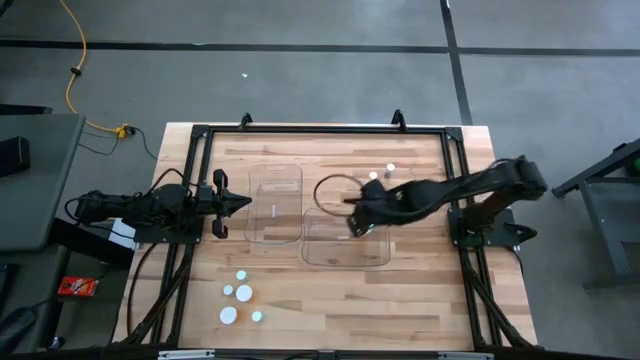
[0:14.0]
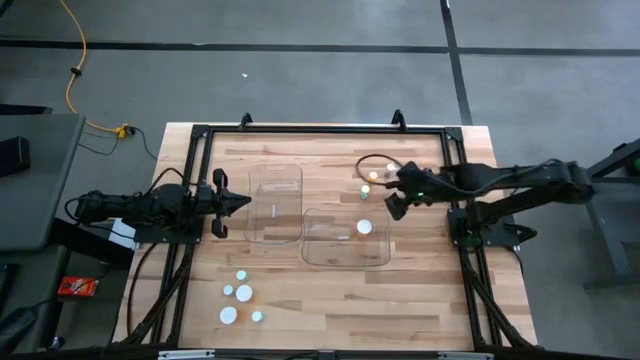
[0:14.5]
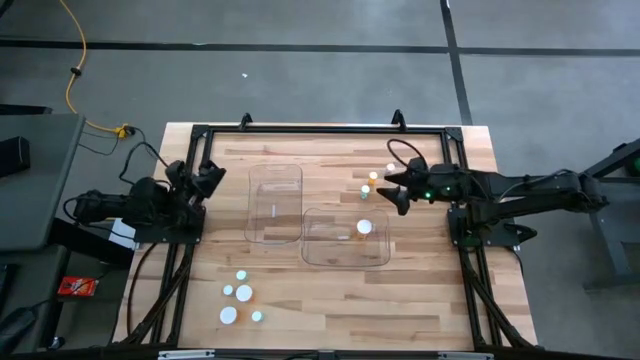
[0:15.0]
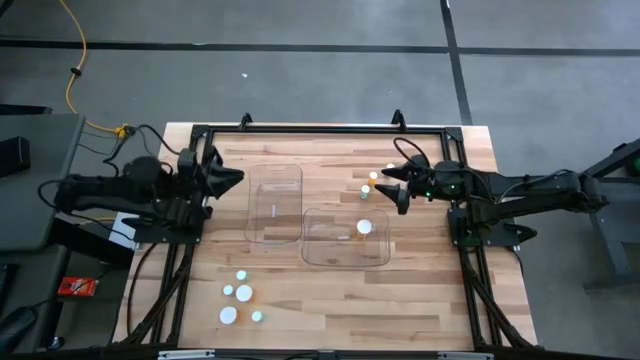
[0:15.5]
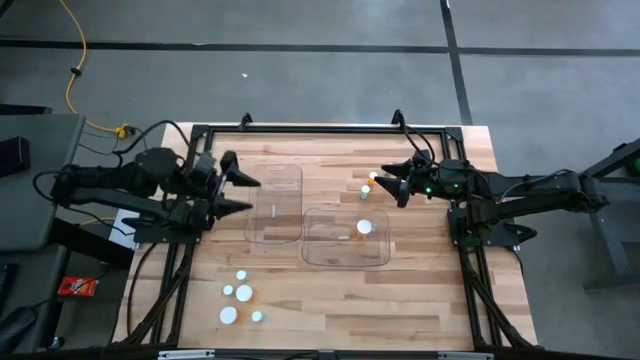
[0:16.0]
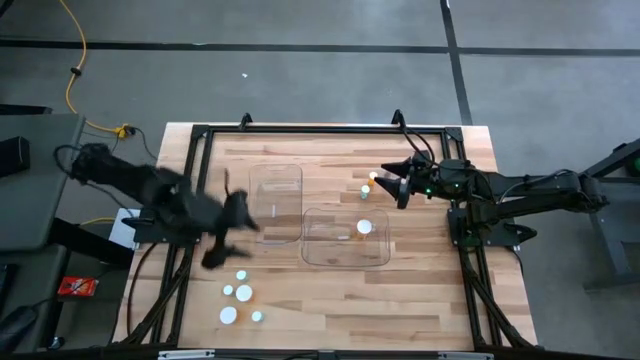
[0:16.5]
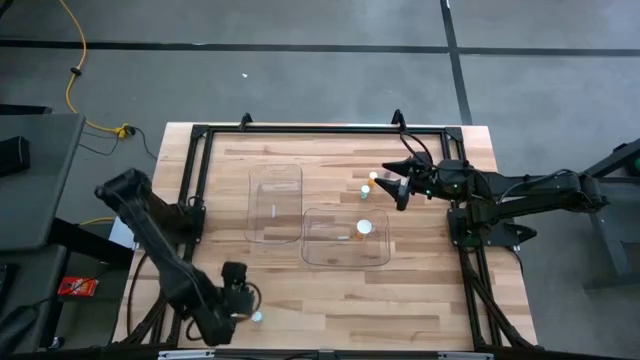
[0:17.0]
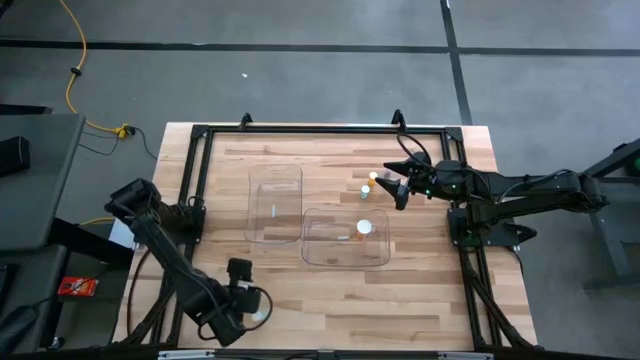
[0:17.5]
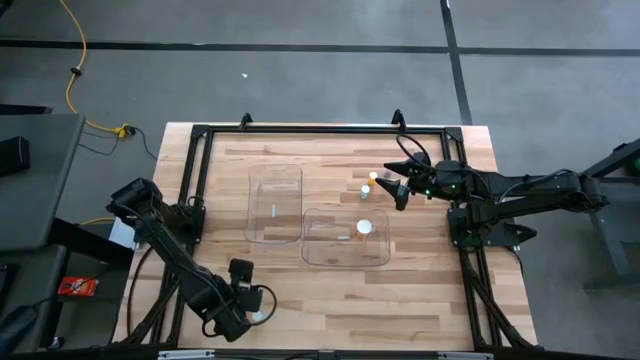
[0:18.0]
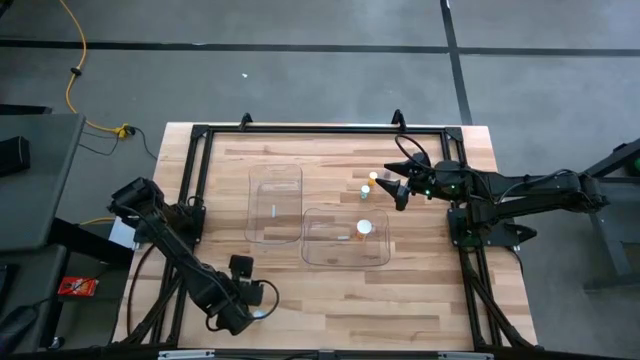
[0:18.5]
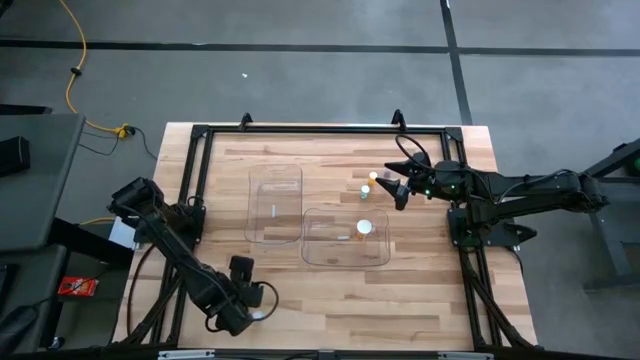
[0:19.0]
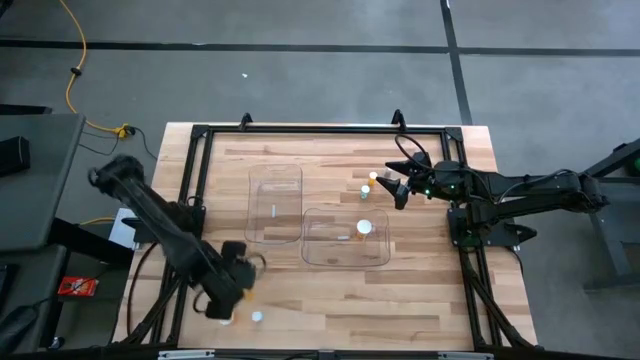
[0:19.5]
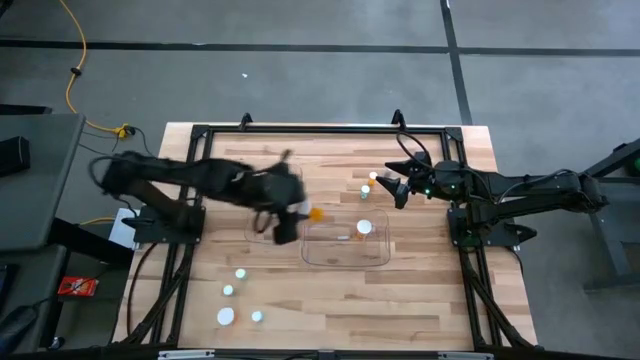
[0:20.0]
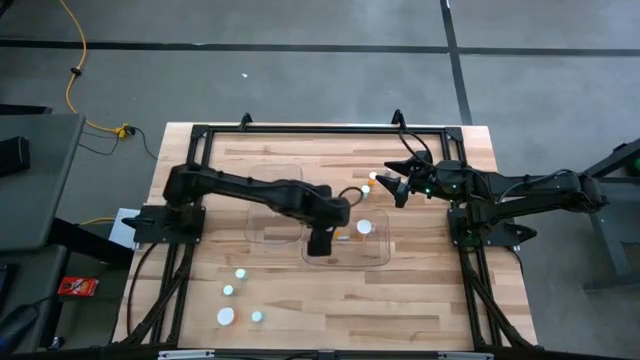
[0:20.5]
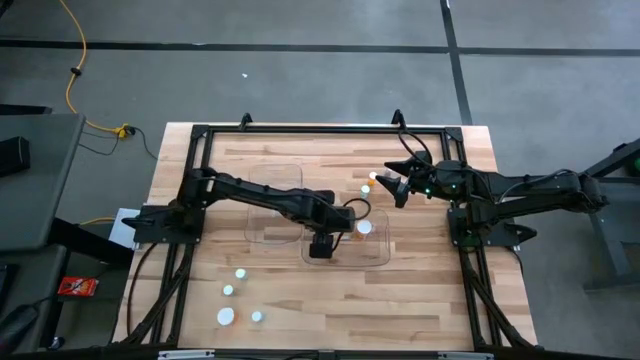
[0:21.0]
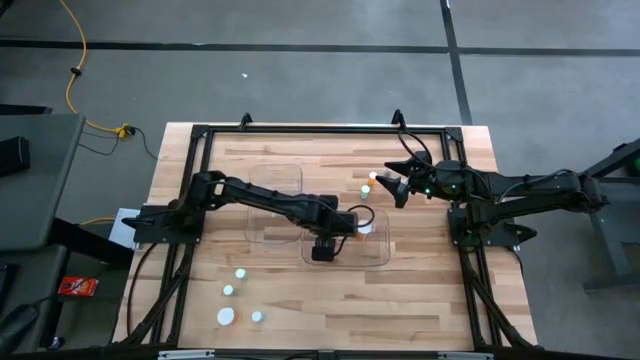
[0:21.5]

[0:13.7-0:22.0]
Task: Pick and place medicine bottles into bin by pill shape (circle, oval)
Put the top orange capsule bottle into the right transparent bin

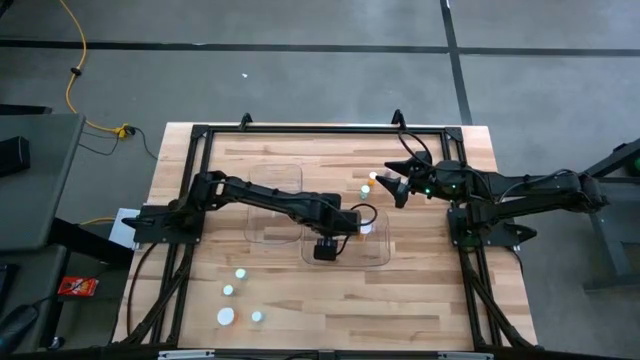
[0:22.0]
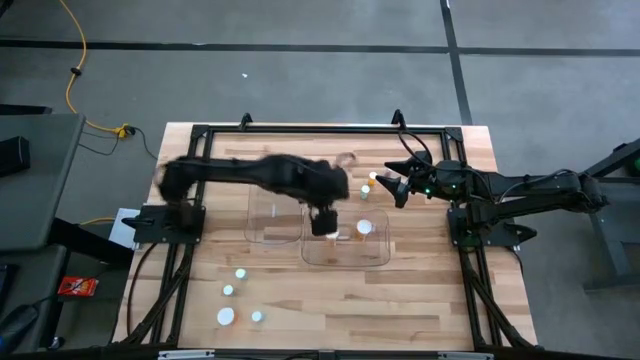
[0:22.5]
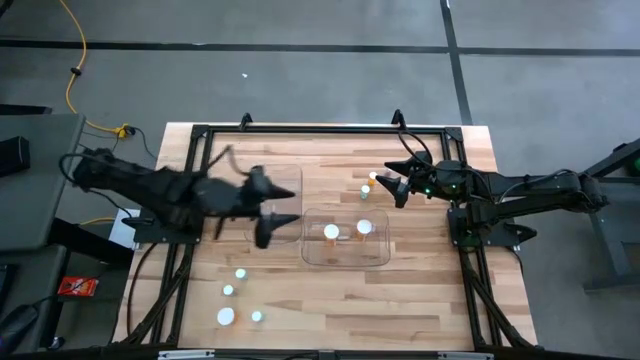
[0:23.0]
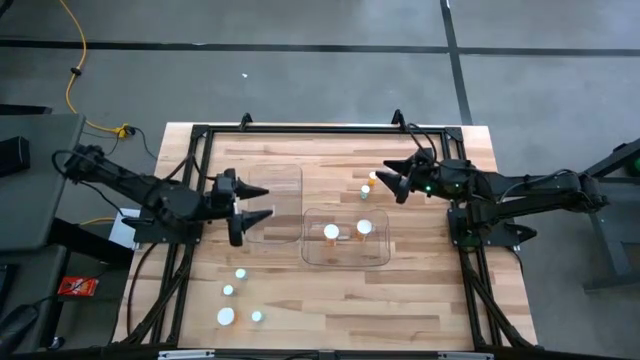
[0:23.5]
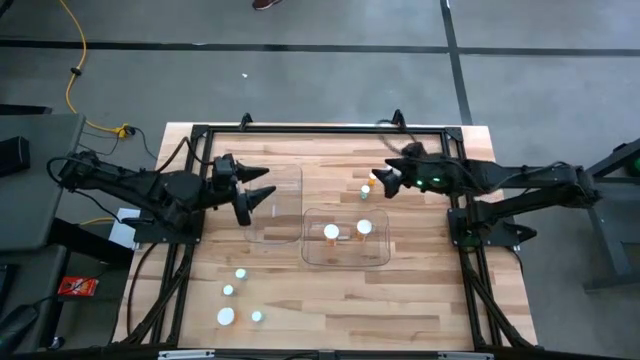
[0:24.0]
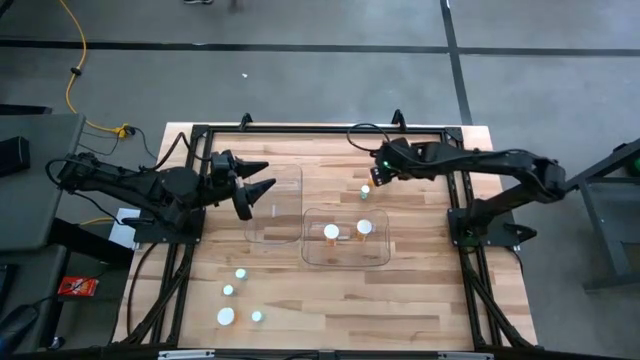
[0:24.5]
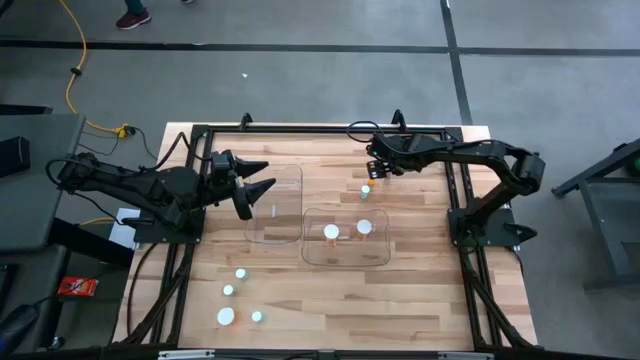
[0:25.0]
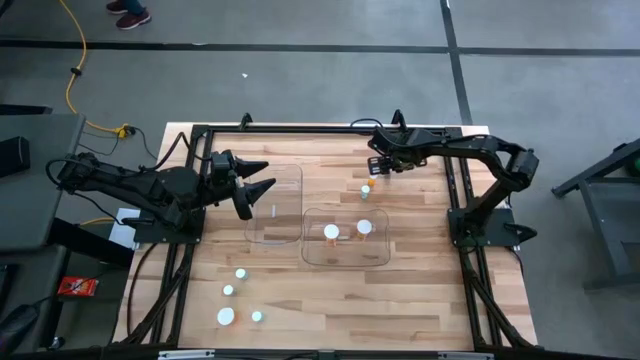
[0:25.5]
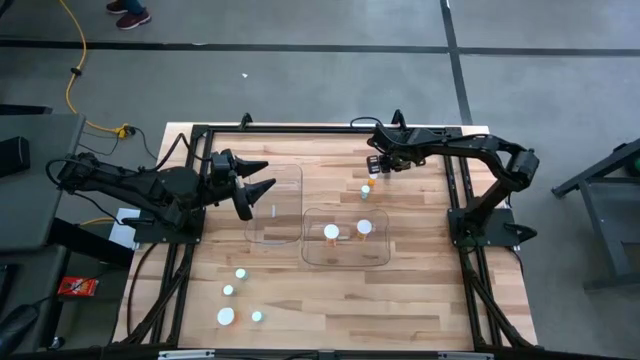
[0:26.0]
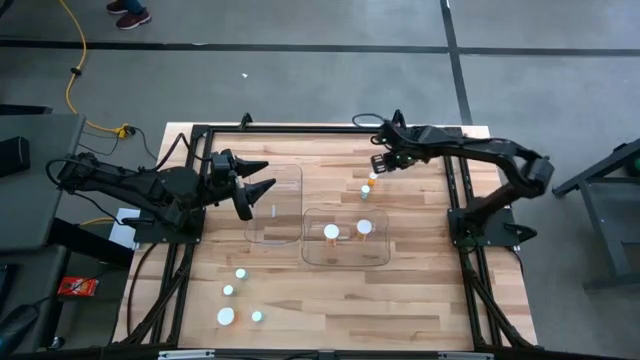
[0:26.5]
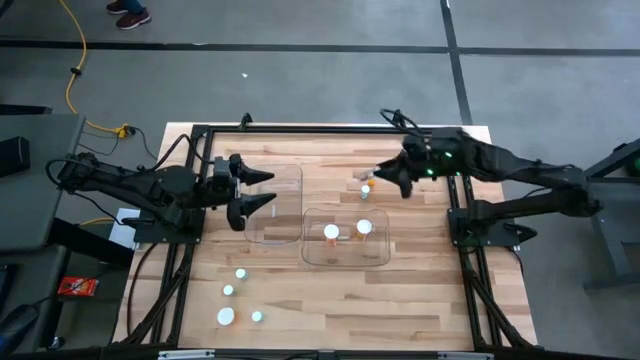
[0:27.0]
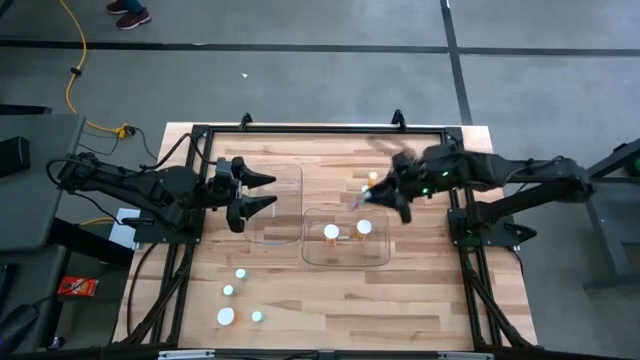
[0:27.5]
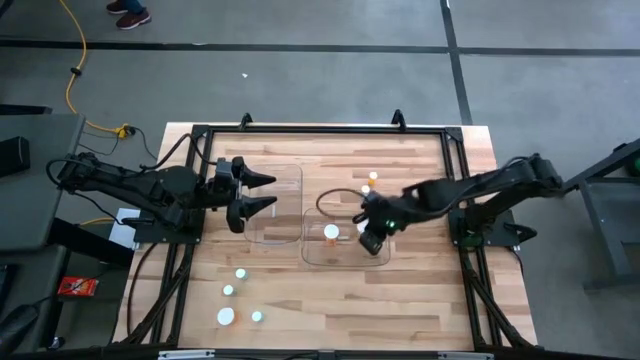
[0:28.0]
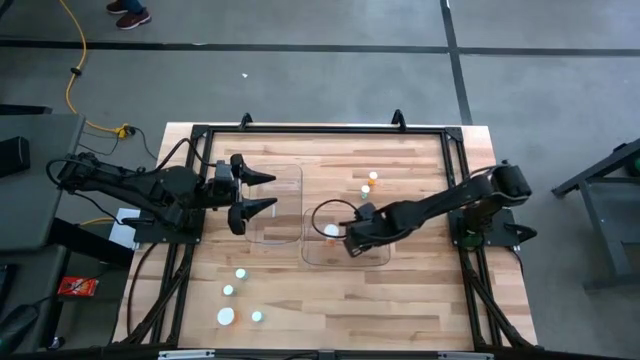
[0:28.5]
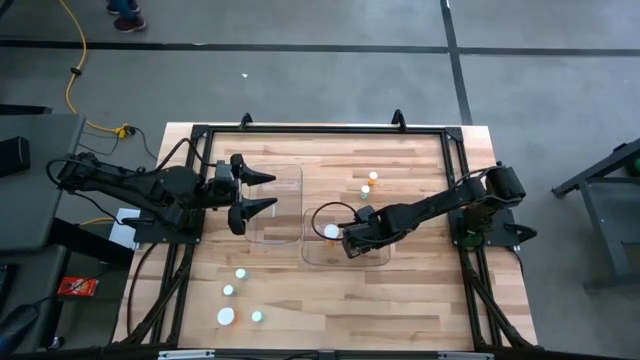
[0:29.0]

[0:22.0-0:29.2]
Put the top blue capsule bottle into the right transparent bin

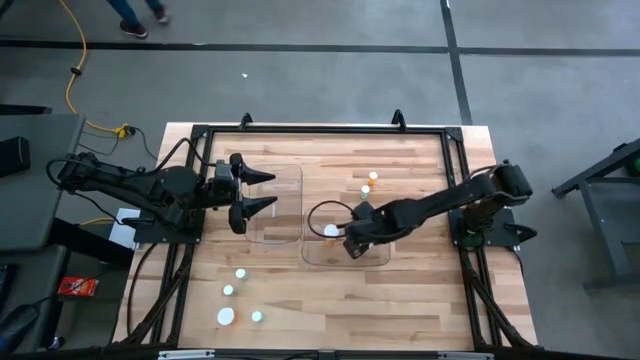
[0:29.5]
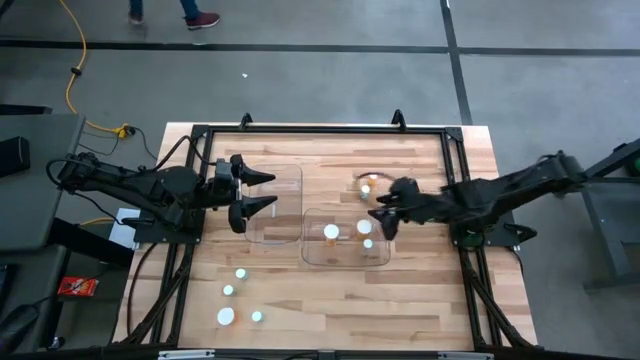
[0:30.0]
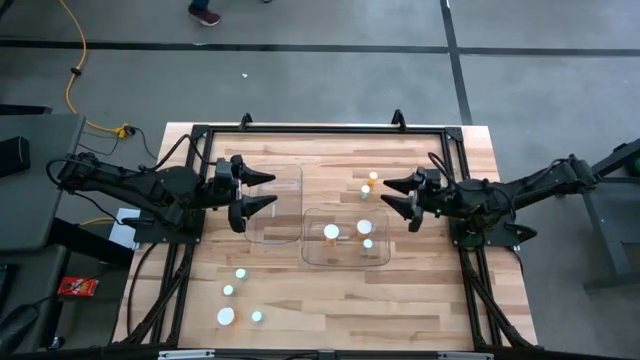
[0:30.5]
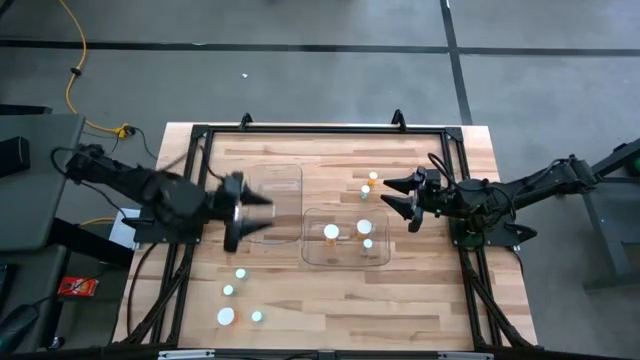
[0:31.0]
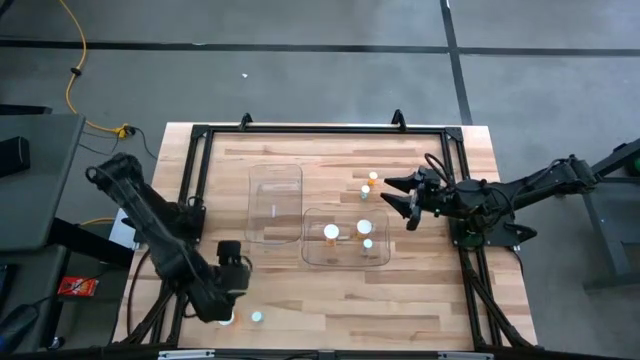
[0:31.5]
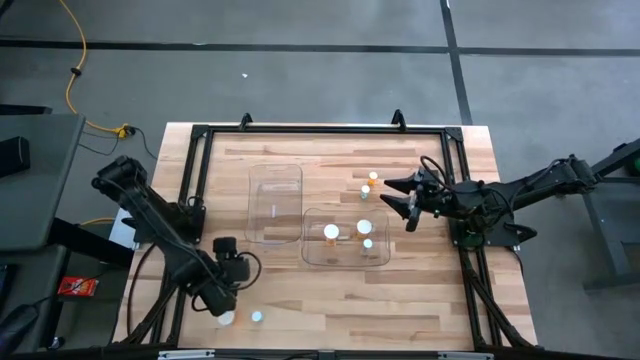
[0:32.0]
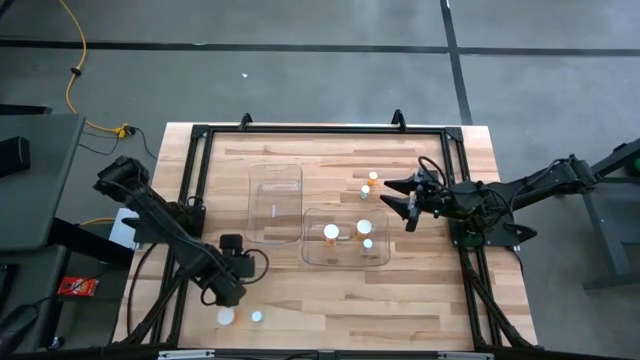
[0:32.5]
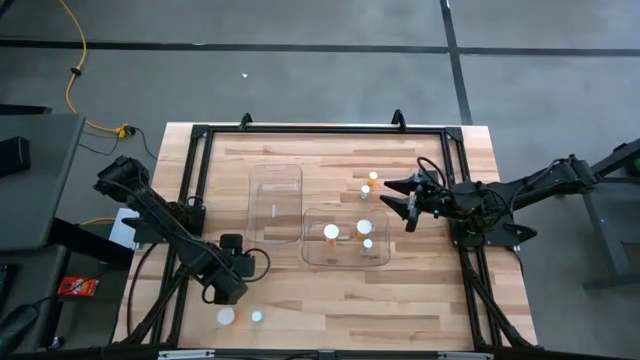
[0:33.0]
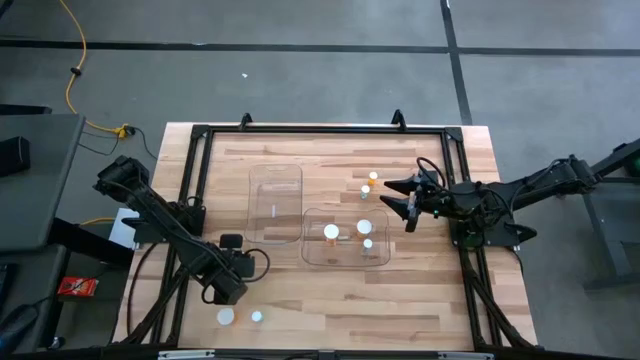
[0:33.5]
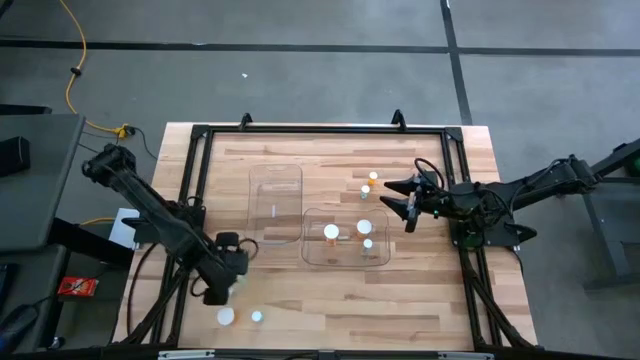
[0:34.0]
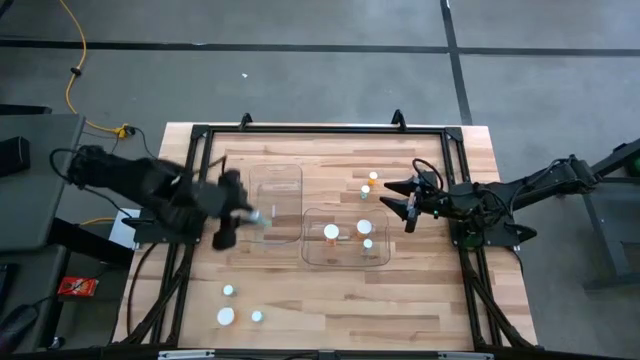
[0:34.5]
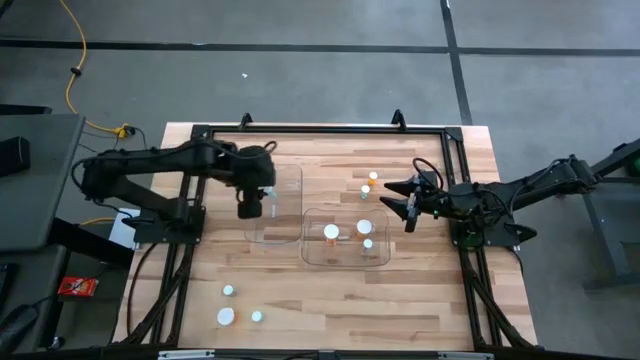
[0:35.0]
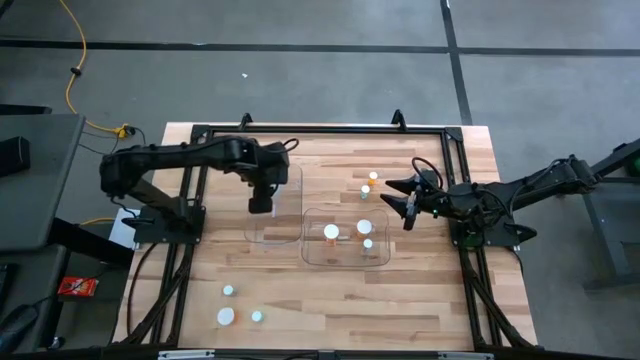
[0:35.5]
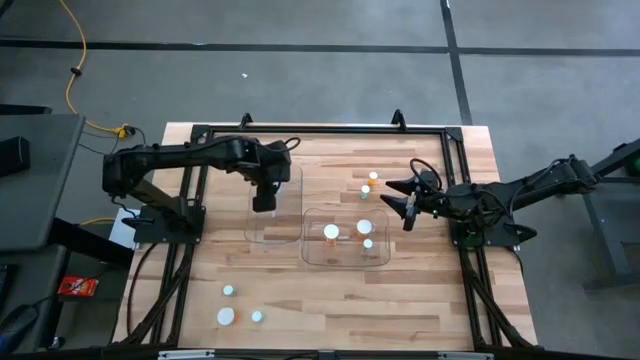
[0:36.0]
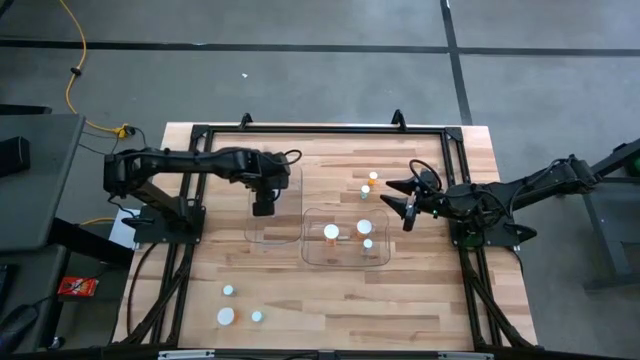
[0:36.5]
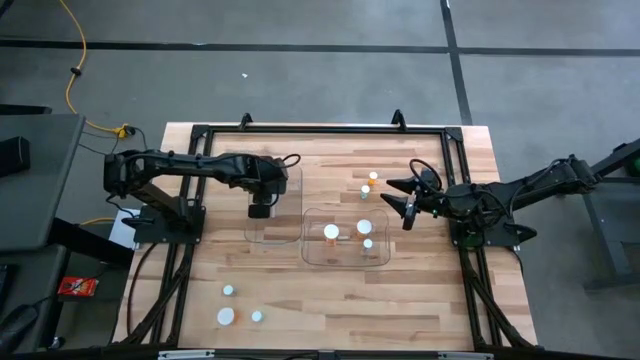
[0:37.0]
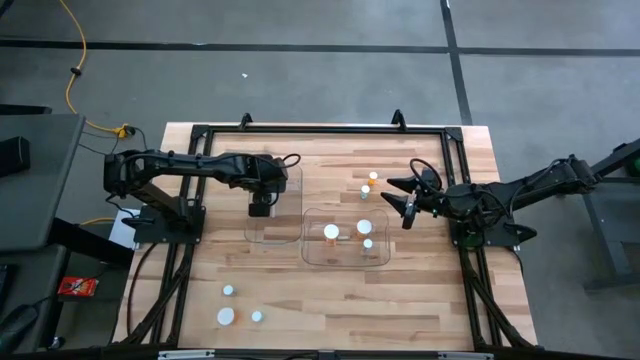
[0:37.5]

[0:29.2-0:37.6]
Put the middle left blue tablet bottle into the left transparent bin
